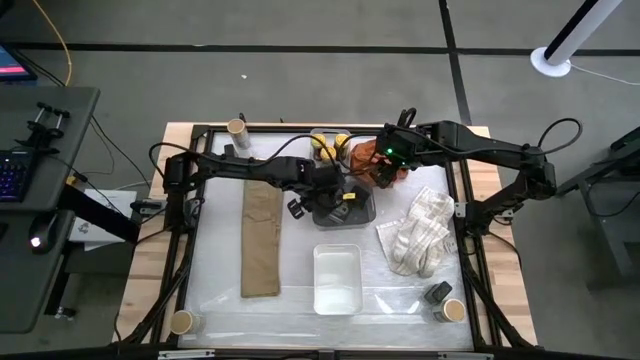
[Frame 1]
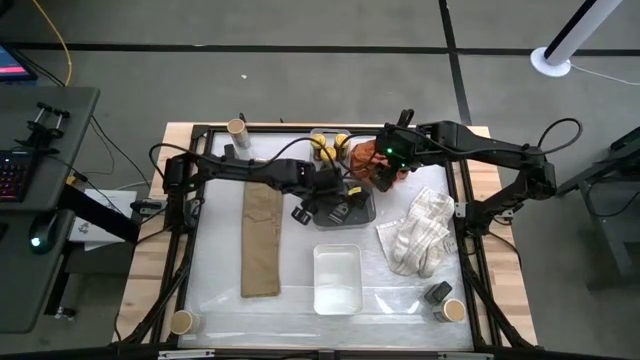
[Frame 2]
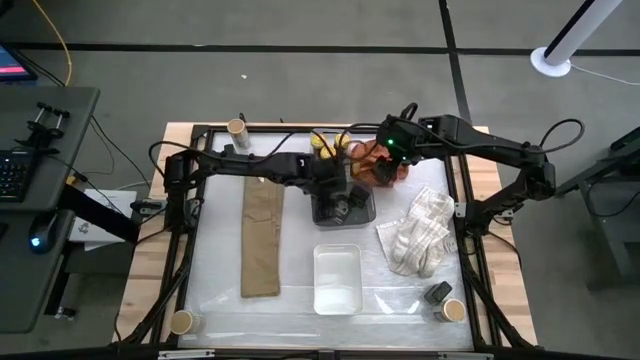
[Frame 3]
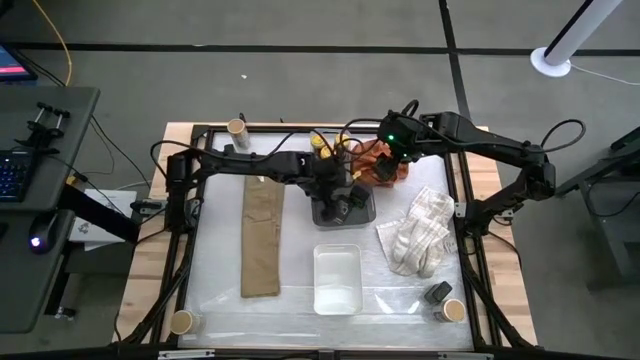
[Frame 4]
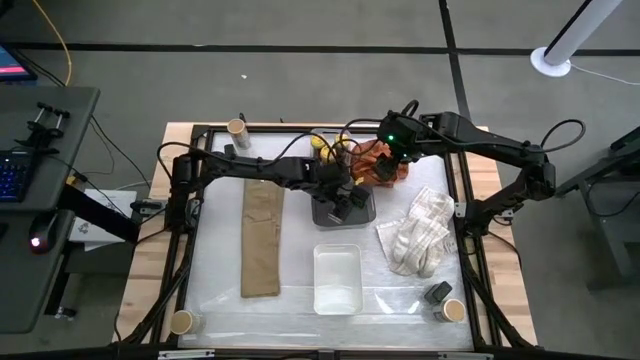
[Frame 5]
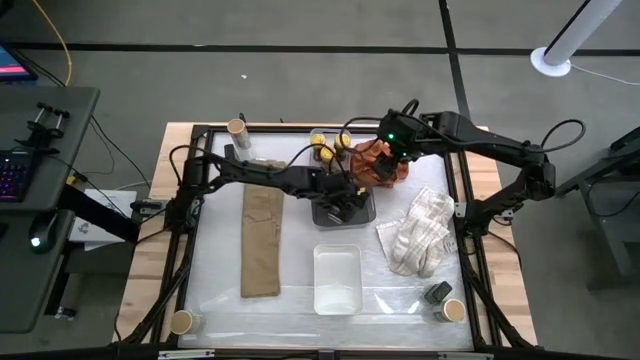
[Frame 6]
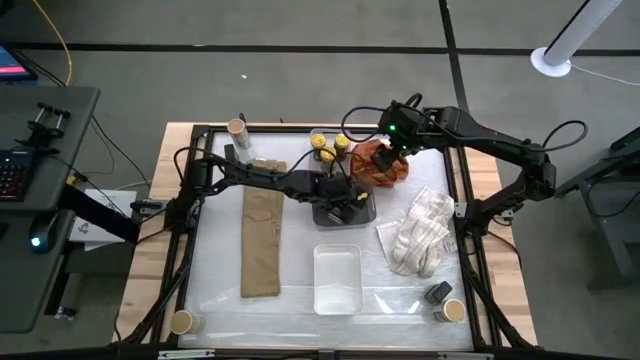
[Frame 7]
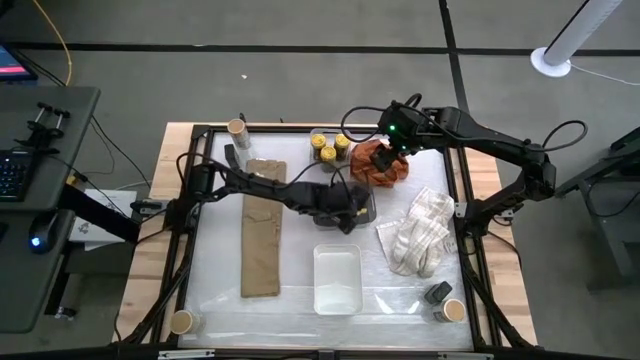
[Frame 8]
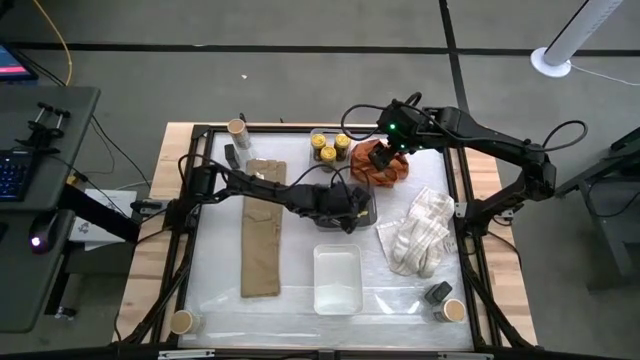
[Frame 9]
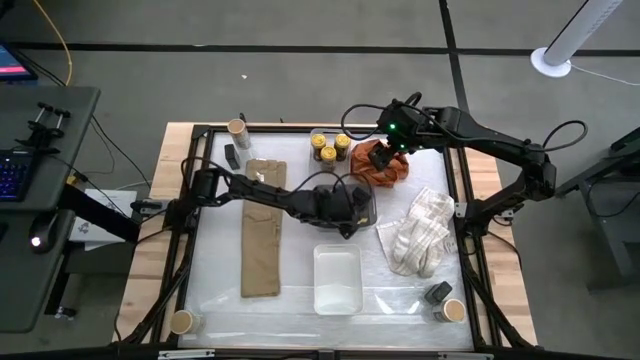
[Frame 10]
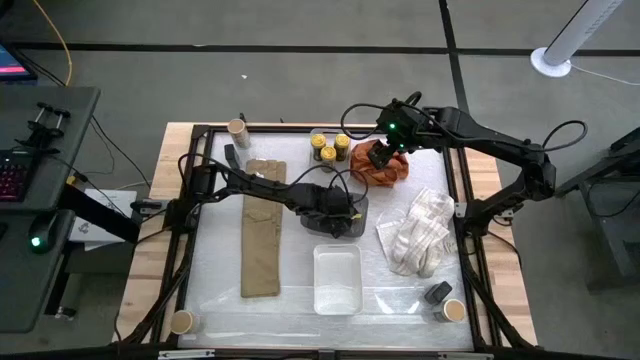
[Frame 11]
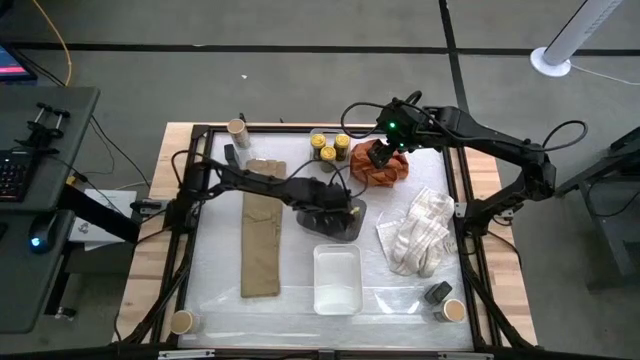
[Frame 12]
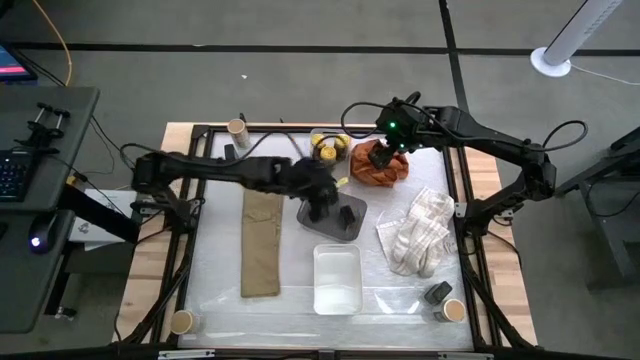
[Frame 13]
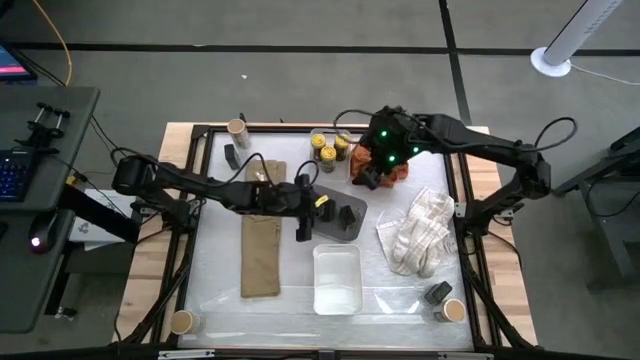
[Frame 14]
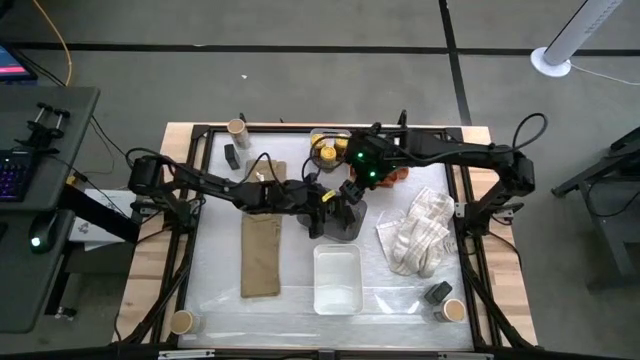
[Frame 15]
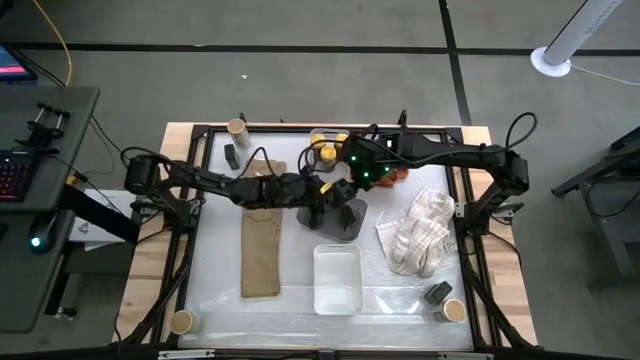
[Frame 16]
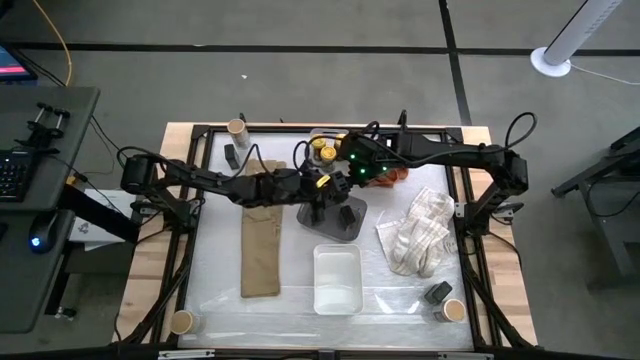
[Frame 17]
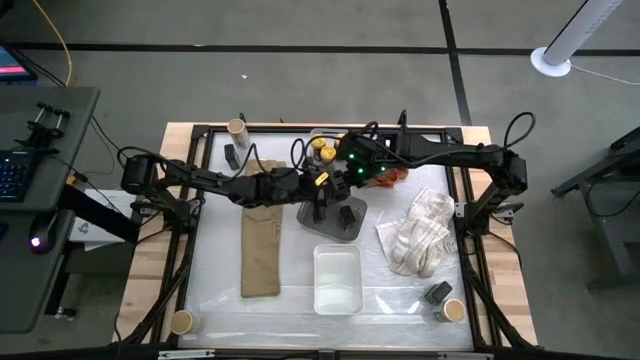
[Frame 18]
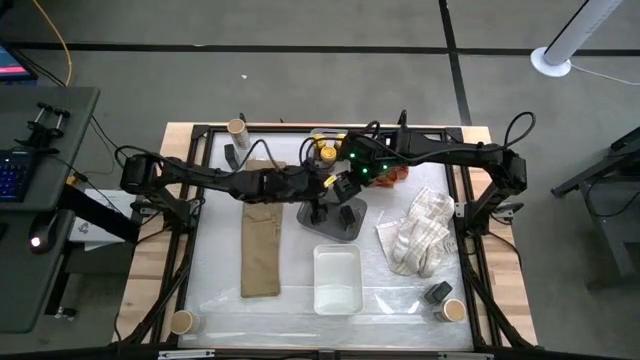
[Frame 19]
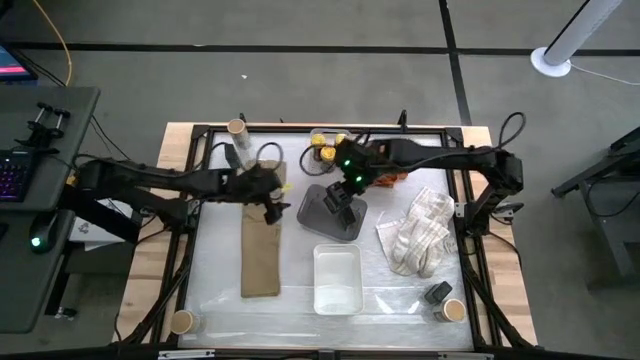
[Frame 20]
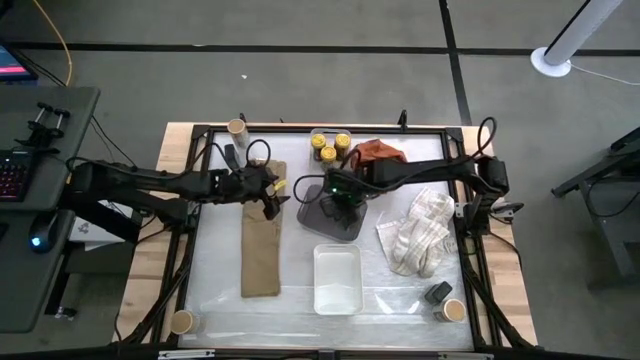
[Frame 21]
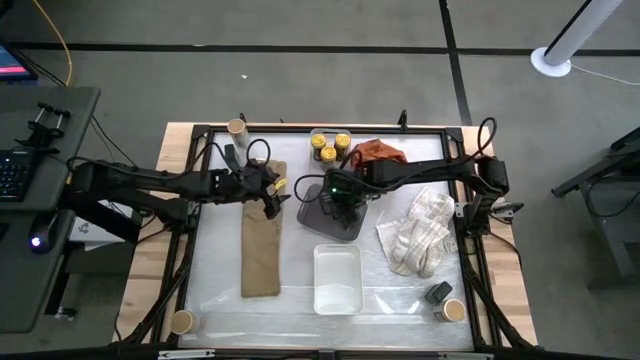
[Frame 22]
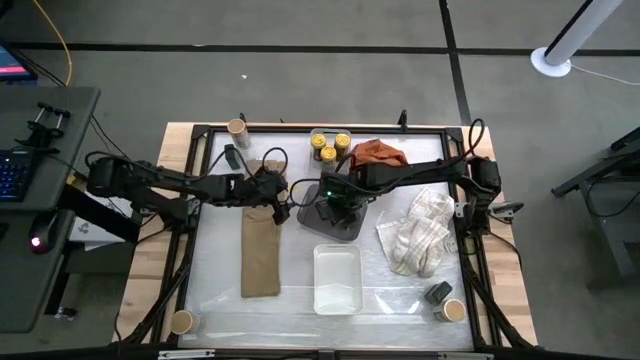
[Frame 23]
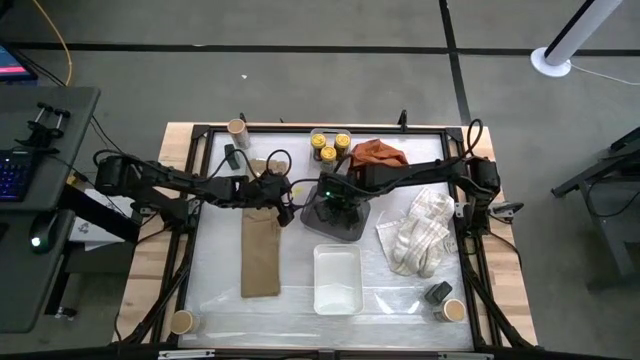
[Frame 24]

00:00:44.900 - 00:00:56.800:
Task: Sort spices by type
Put the bottom left black seasoning can into the black bin

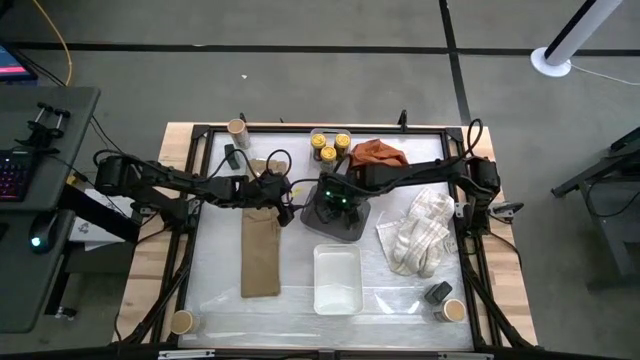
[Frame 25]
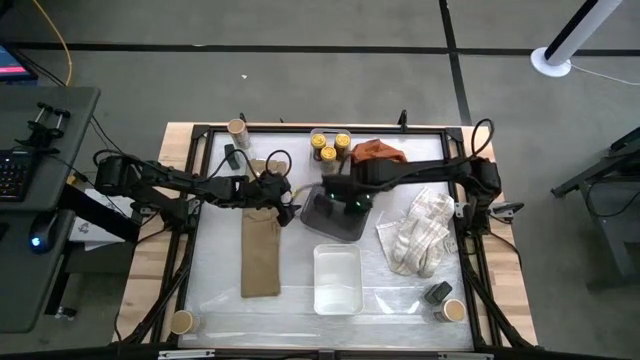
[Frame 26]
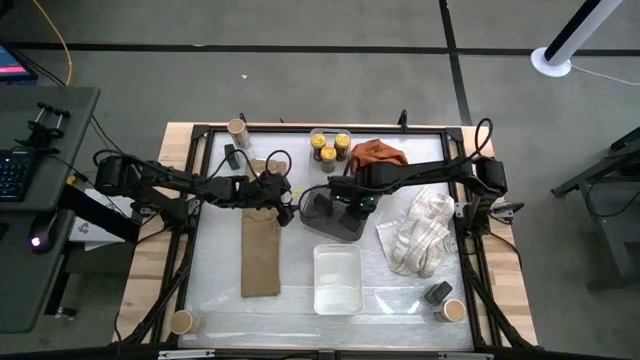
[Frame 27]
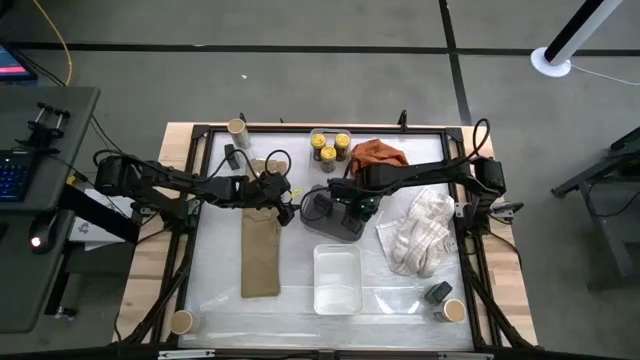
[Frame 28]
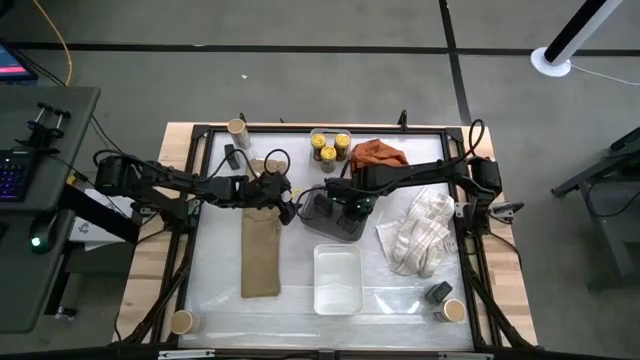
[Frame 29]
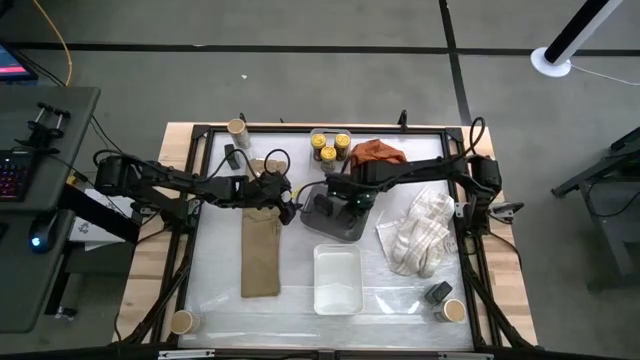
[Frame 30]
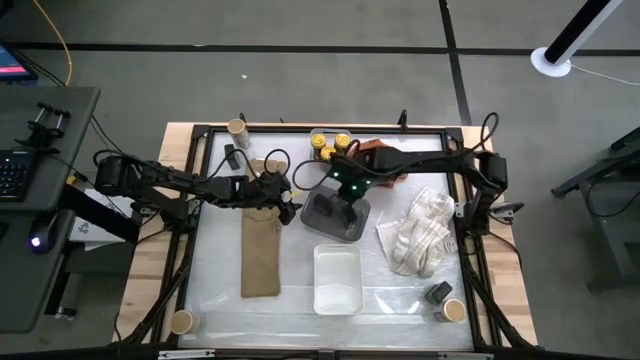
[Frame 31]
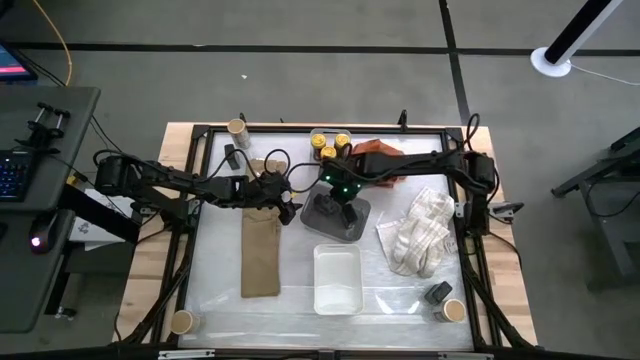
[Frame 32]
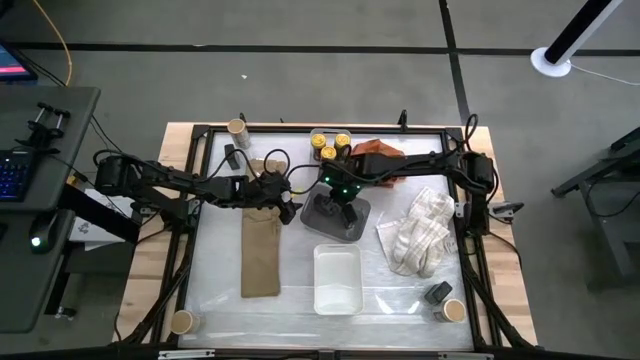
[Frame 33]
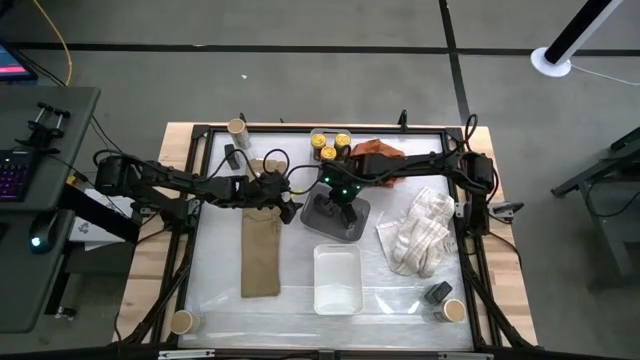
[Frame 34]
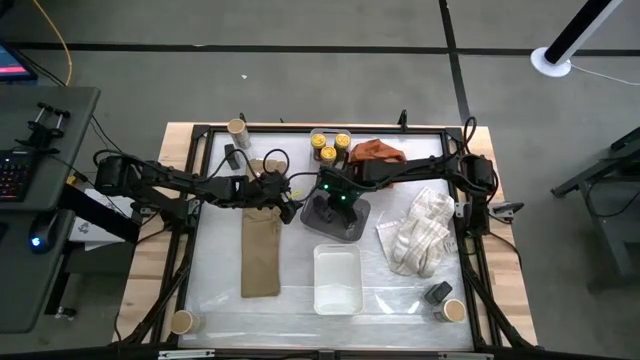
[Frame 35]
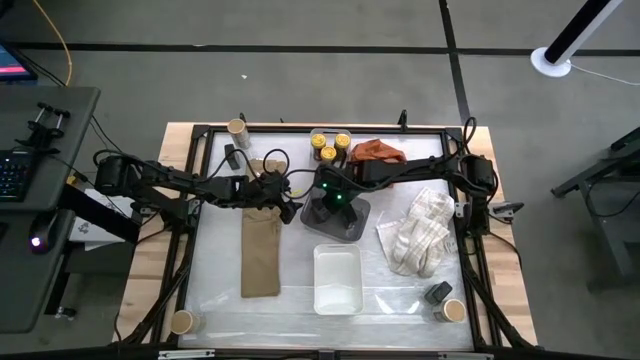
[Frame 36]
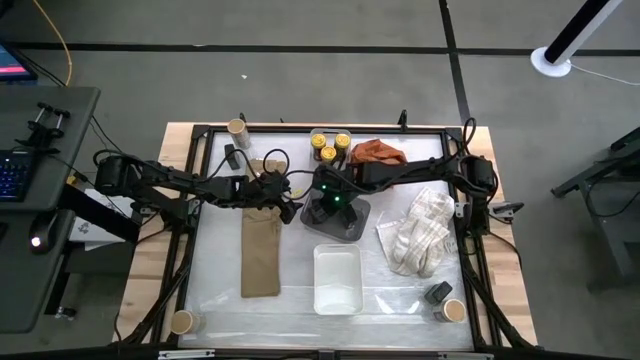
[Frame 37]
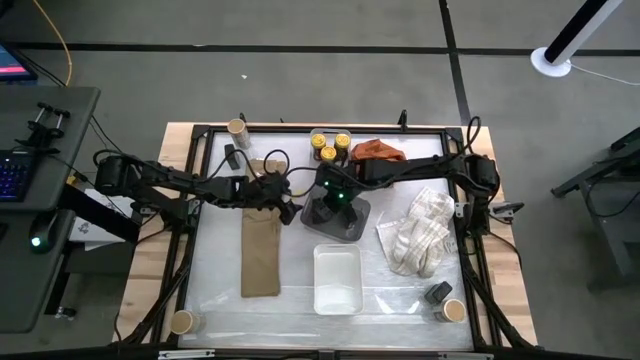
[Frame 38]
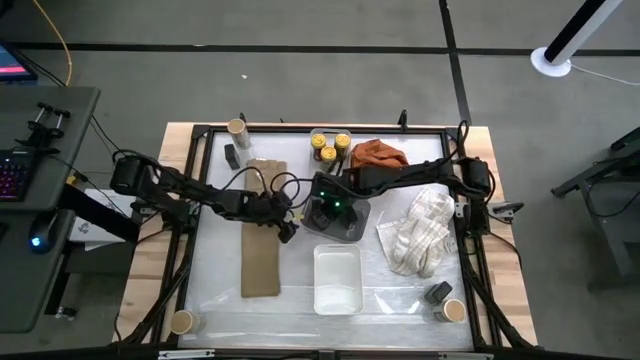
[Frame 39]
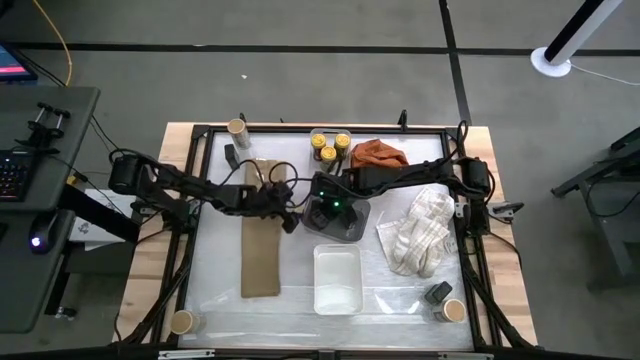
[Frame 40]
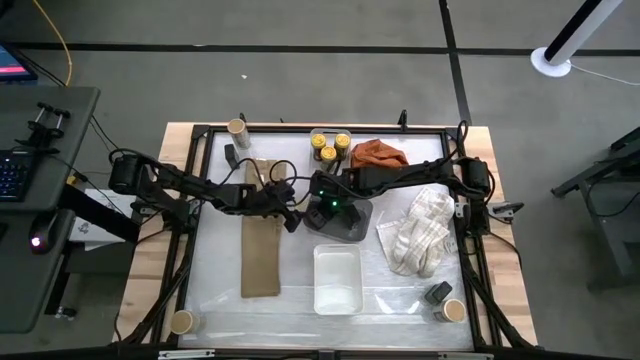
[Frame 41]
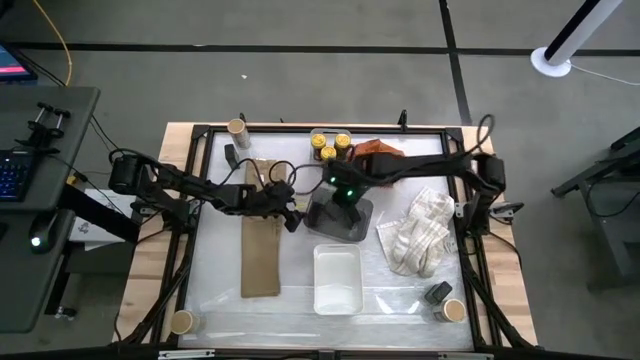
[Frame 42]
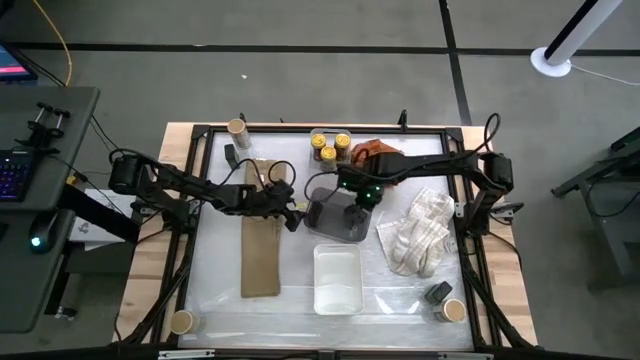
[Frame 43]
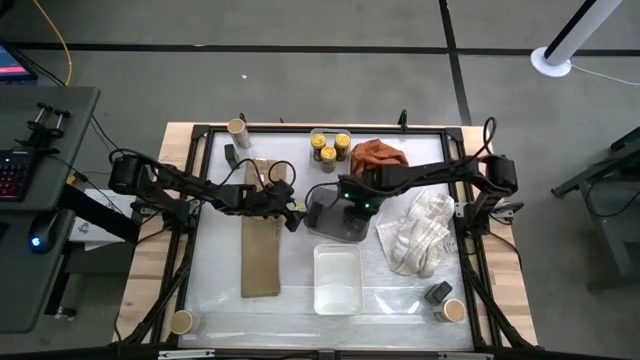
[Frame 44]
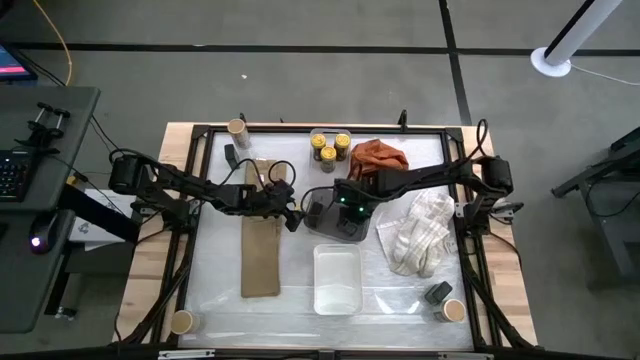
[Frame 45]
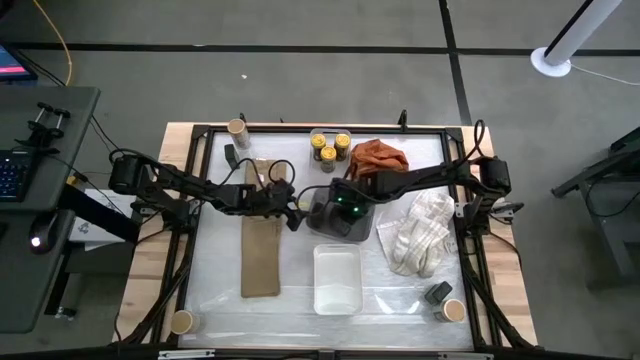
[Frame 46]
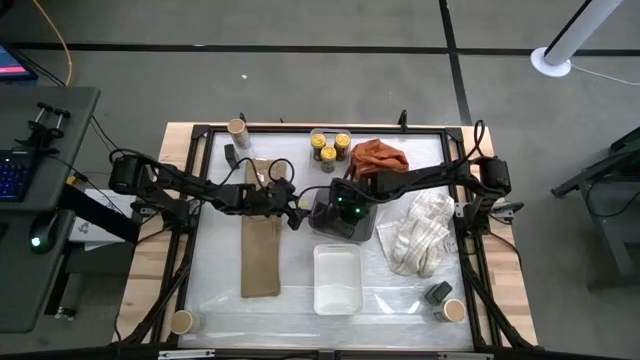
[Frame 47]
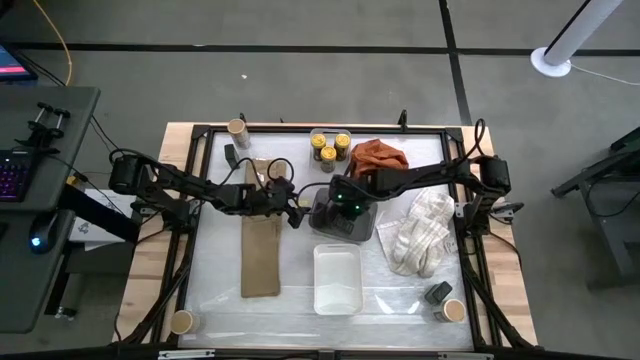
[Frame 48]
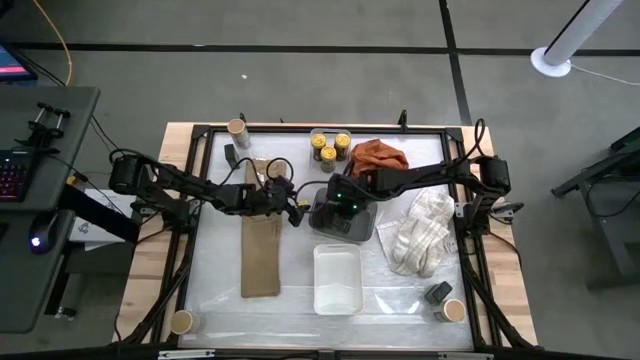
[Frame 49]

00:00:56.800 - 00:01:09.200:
Adjust the black seasoning cans in the black bin
